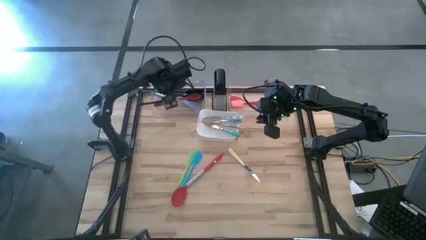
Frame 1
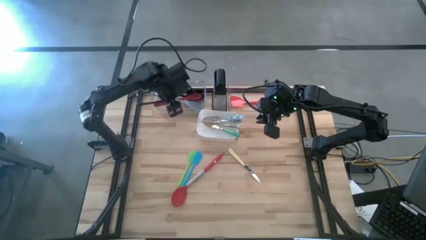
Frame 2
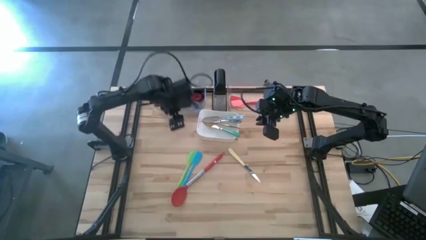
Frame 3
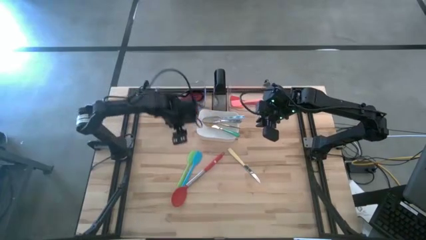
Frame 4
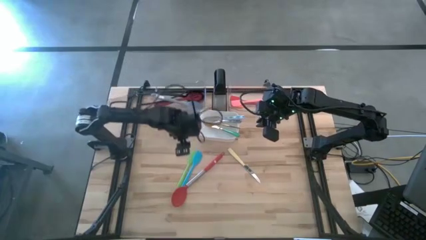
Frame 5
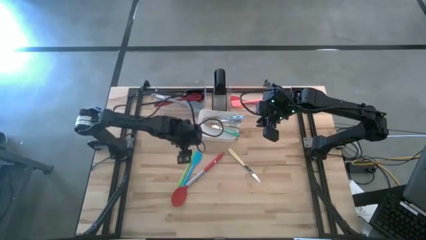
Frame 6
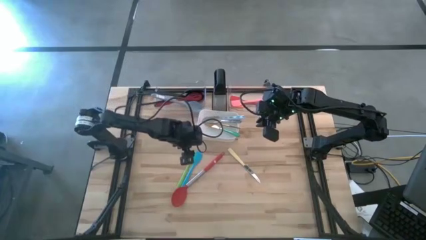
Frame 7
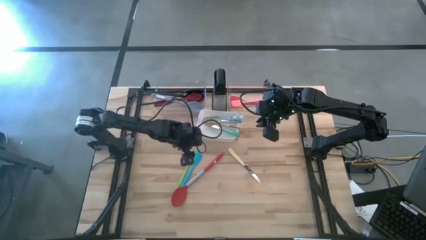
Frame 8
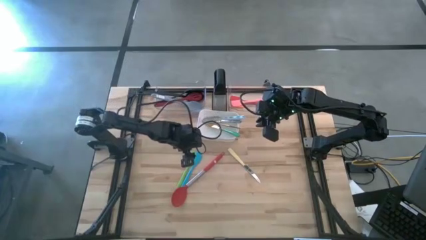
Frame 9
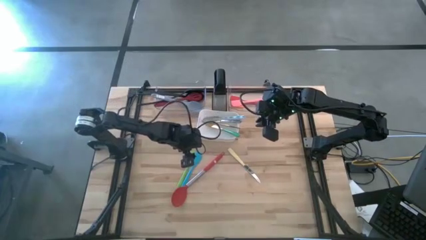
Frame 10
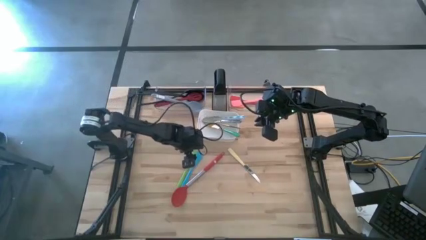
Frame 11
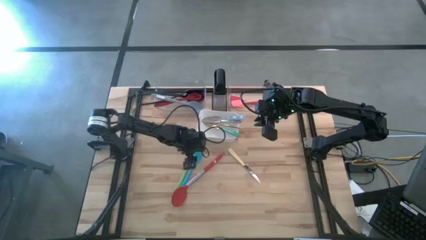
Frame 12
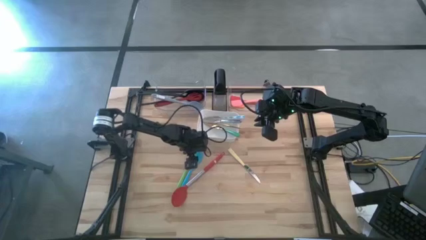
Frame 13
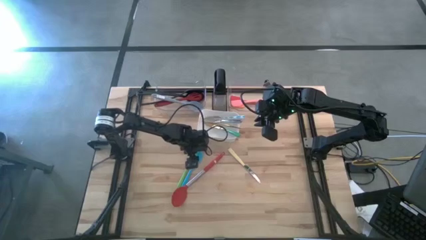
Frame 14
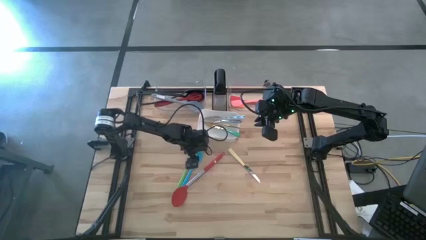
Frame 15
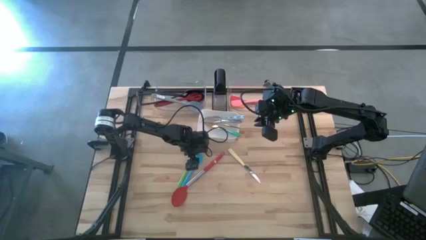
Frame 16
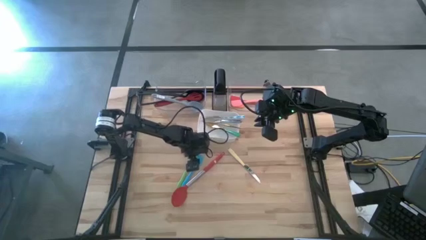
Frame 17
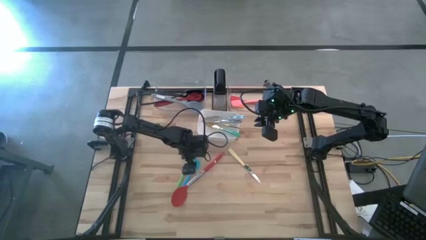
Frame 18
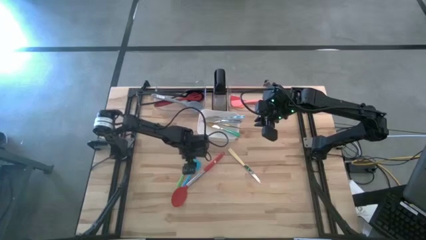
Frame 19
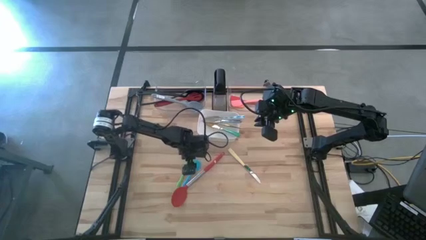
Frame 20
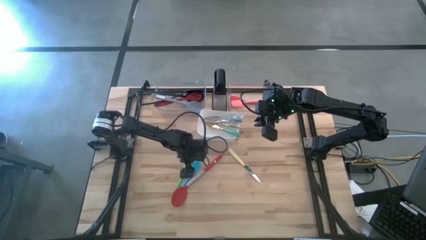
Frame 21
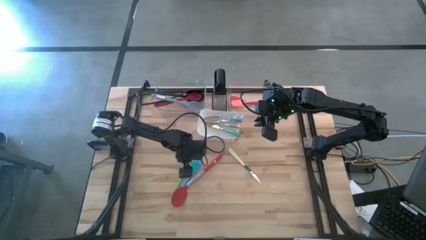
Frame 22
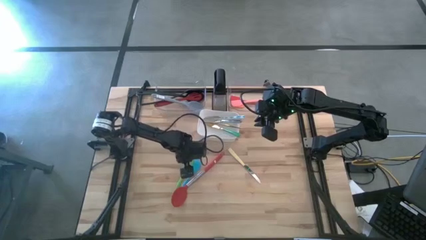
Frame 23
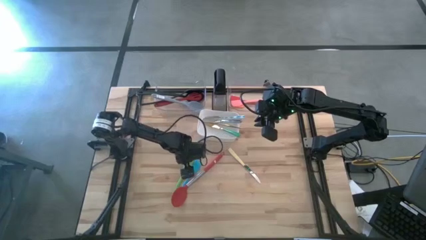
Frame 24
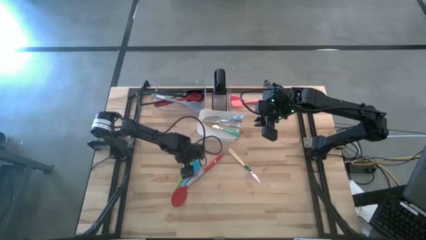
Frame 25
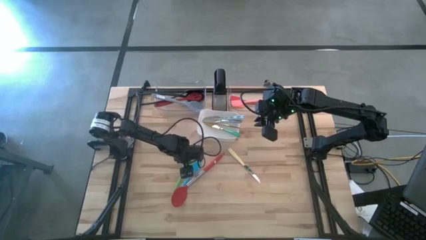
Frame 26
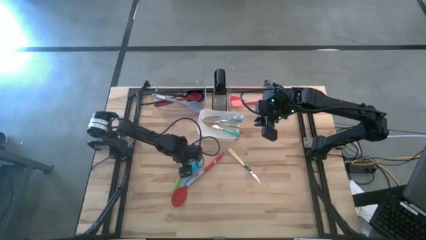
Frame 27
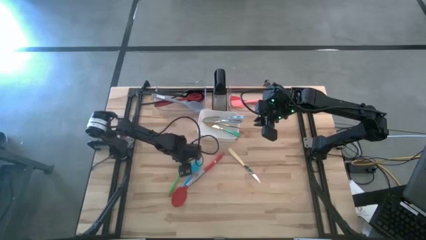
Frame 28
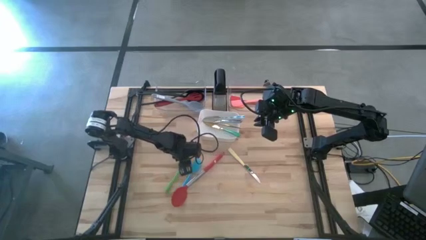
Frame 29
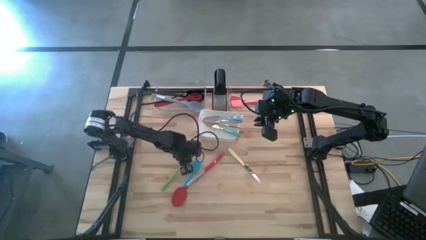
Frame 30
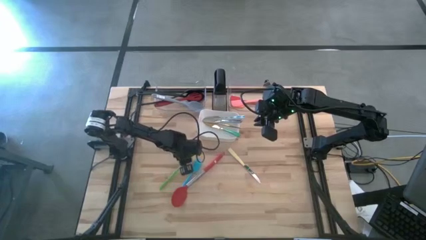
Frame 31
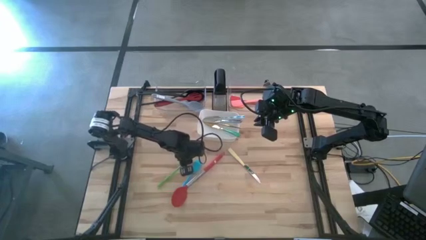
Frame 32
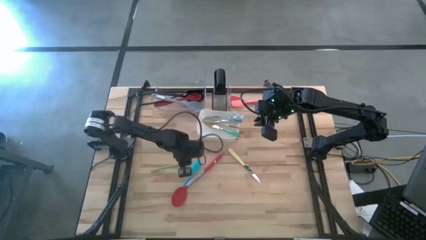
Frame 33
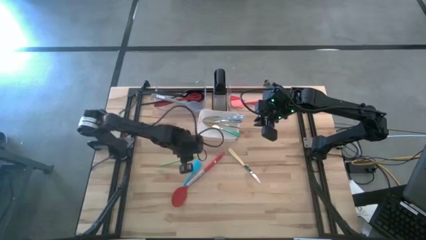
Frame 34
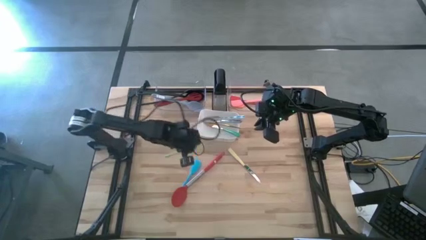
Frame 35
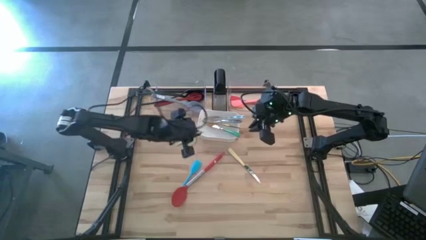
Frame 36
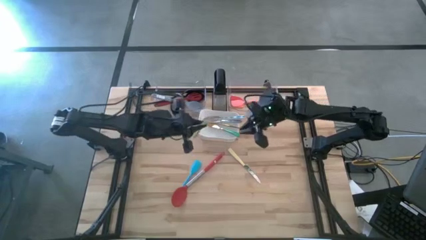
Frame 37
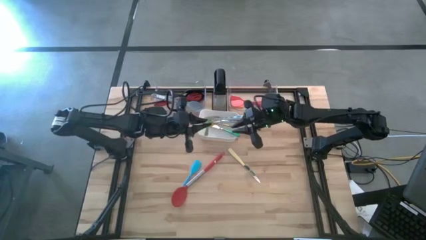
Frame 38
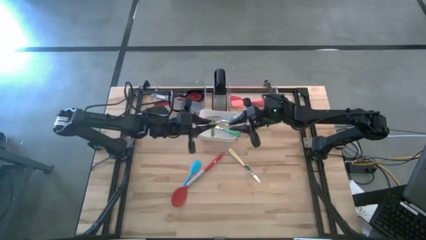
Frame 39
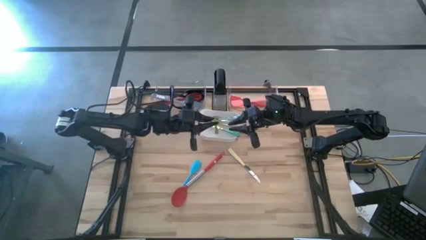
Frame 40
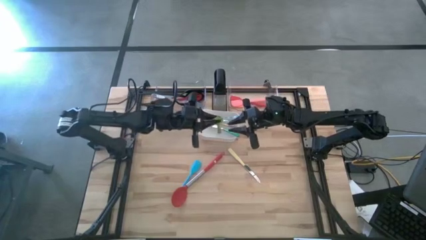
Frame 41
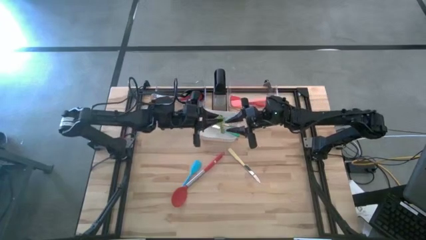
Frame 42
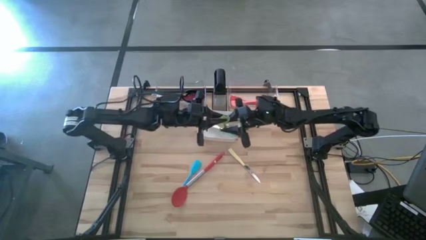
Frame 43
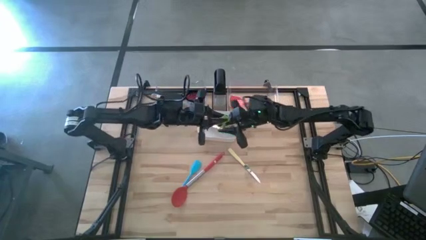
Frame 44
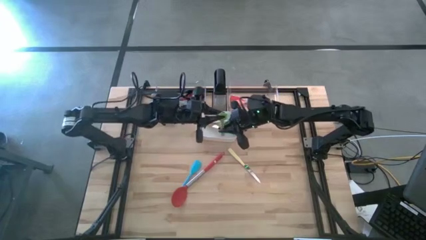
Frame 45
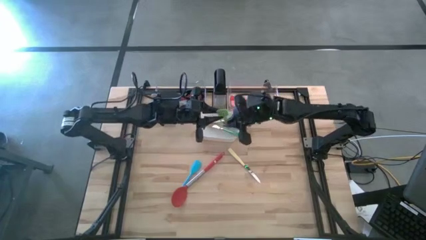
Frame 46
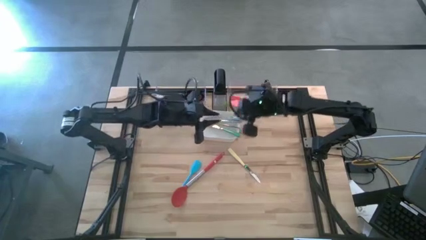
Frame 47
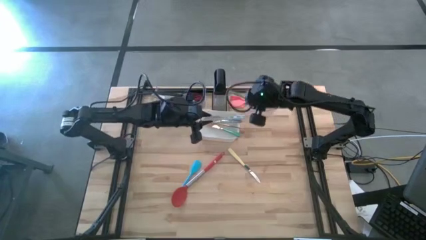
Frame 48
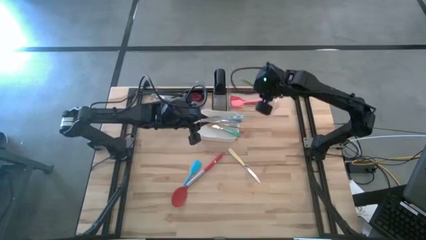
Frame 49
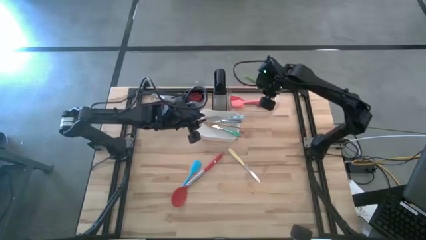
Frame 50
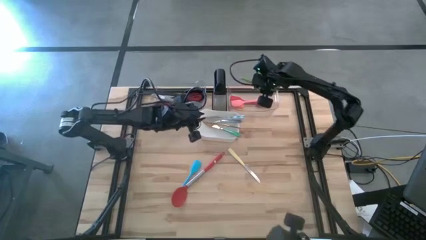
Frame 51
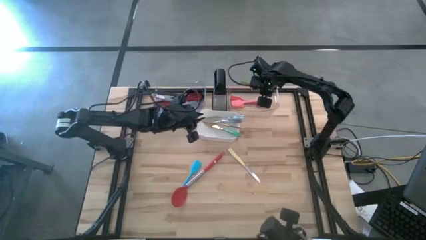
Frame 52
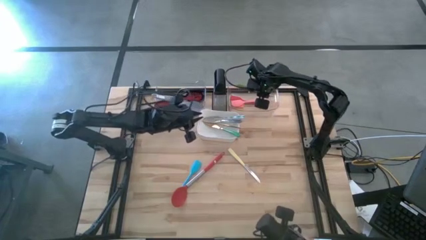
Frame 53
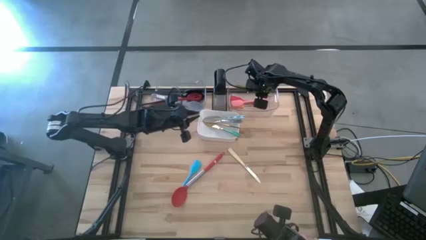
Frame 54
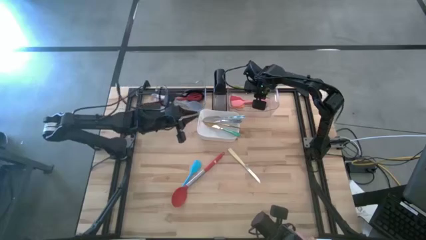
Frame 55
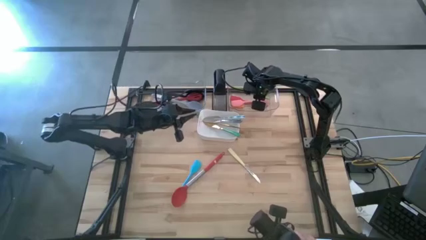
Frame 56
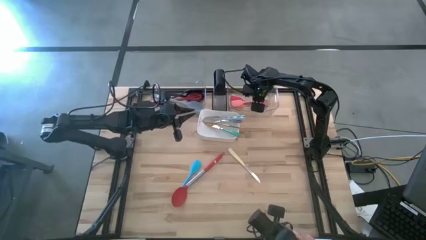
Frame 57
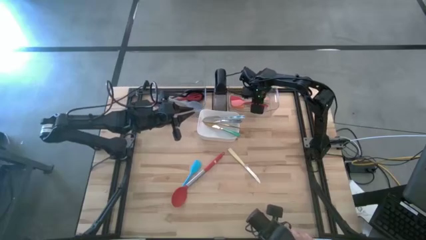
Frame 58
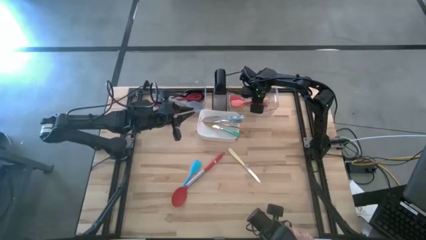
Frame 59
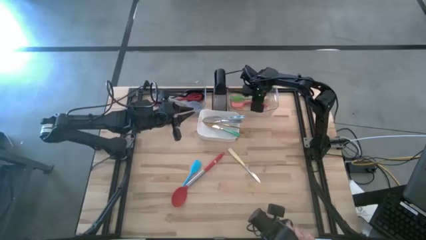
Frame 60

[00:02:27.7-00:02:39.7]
Task: Pick & Place Kitchen Items
Put the green spatula into the right transparent bin

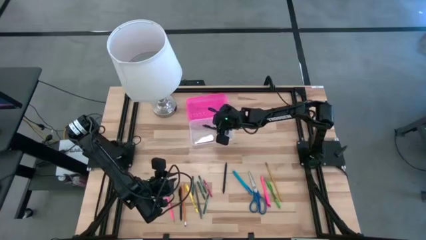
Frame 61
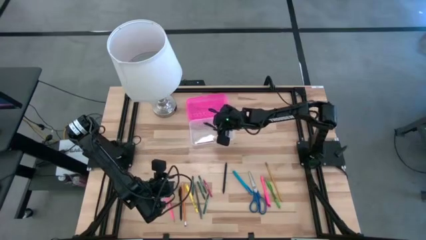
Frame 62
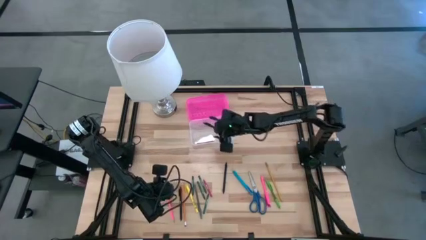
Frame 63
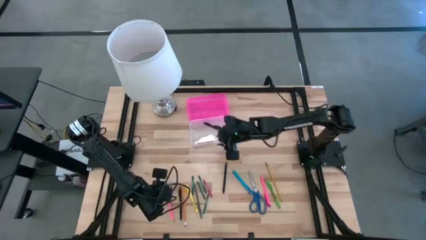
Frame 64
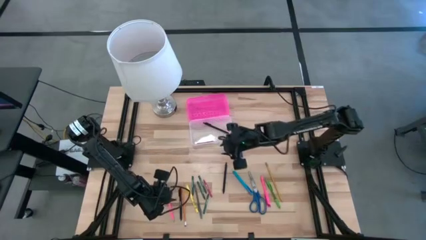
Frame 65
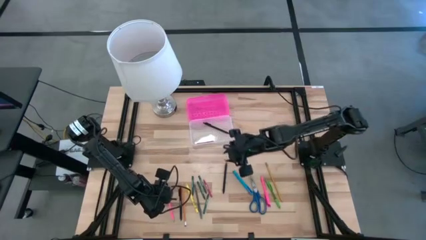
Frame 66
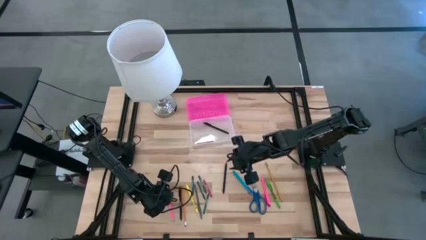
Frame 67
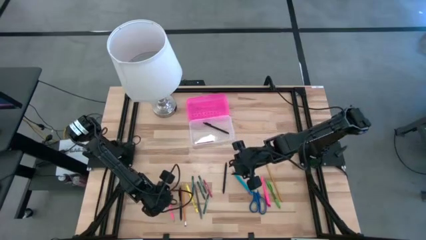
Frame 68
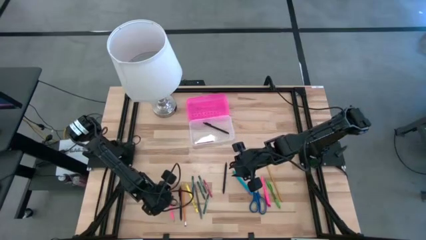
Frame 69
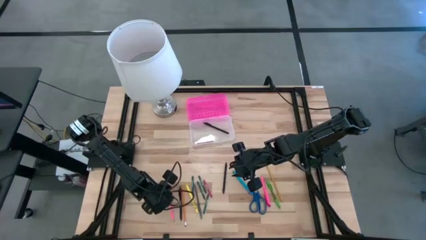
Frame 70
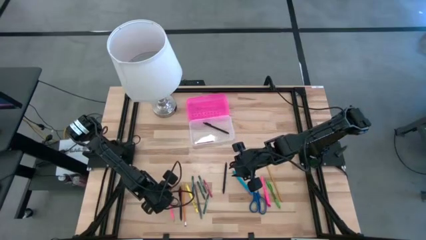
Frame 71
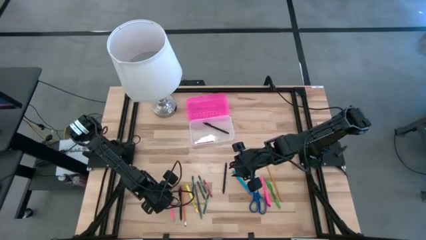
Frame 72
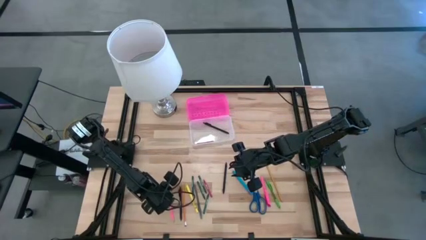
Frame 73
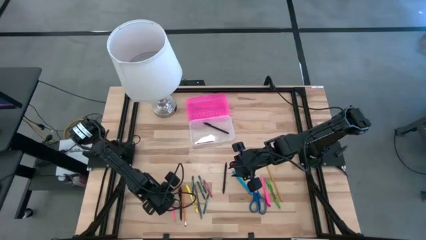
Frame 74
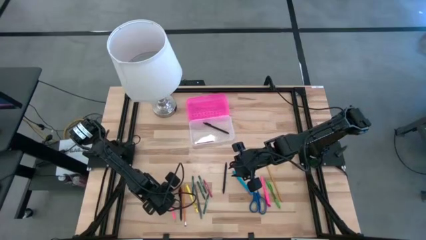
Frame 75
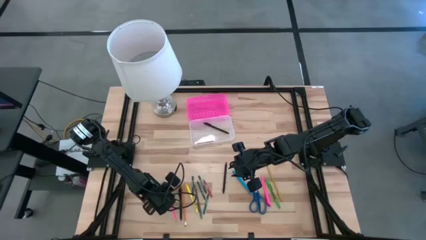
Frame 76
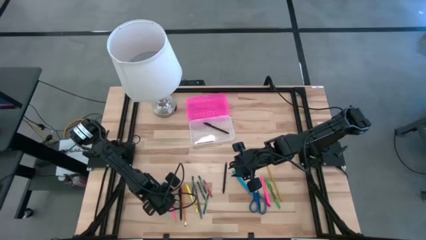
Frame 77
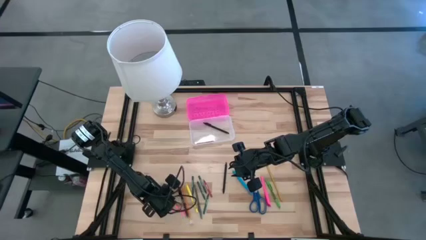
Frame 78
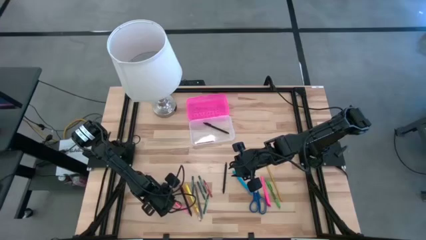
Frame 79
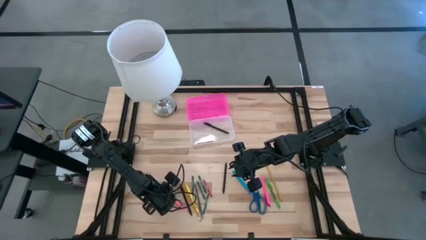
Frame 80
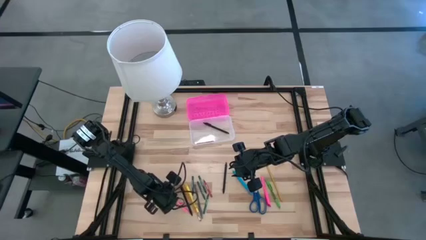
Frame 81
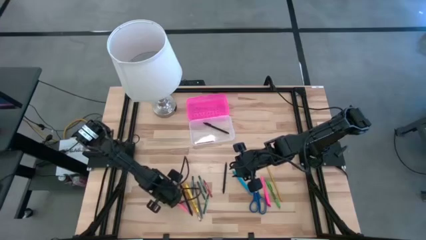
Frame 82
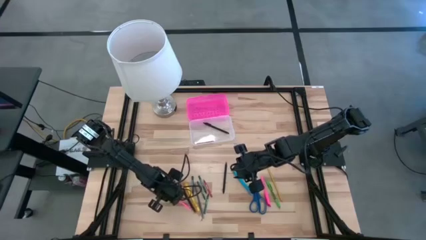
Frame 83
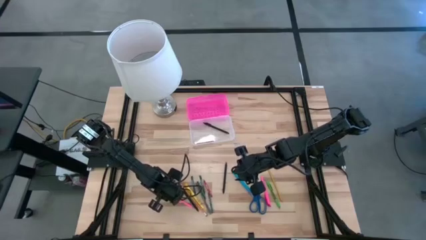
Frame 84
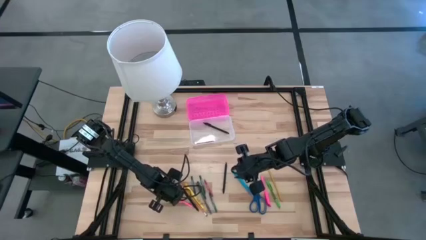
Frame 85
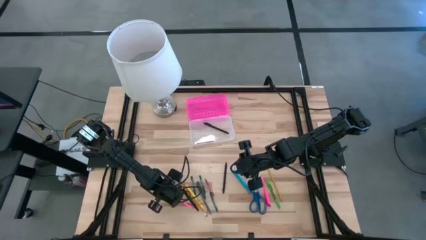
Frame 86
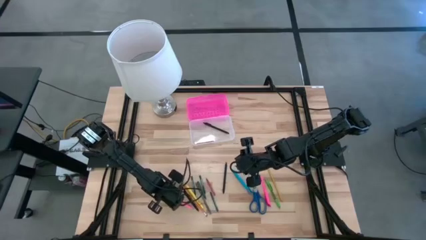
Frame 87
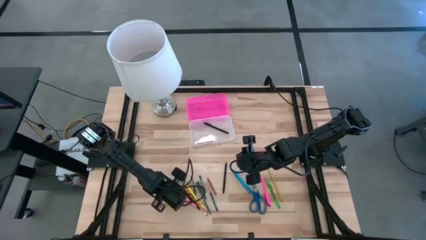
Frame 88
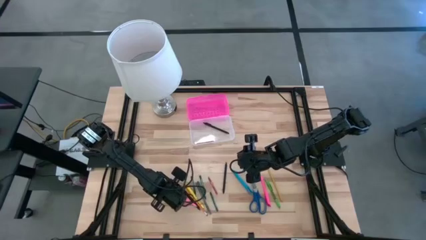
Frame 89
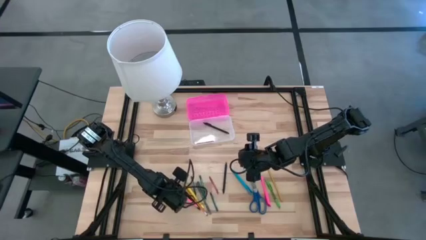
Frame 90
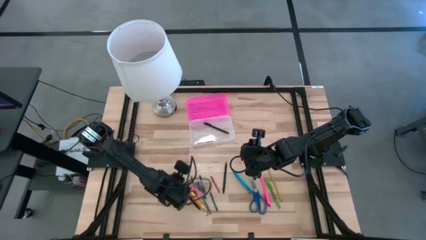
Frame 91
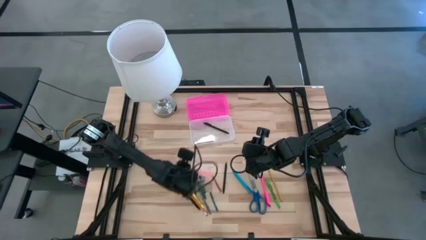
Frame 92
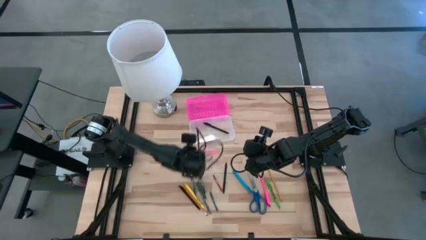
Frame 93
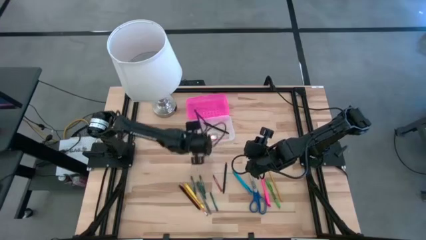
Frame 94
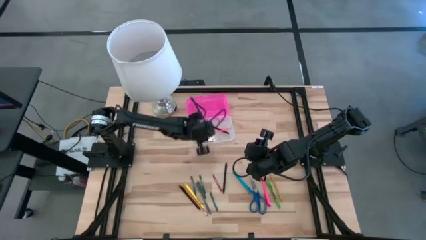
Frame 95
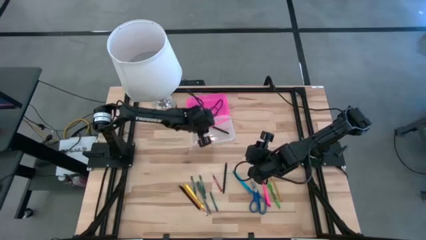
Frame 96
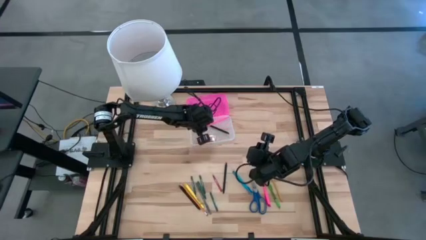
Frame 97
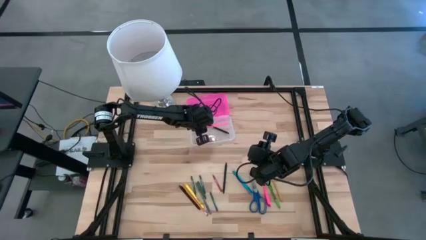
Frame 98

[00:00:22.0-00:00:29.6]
Task: Pick & place school supplies into a supply box
Put the pink pencil into the pink supply box
